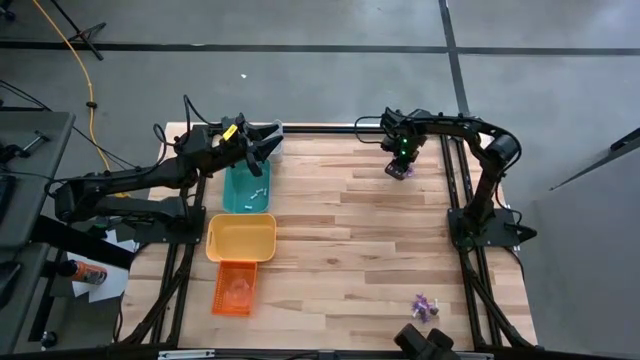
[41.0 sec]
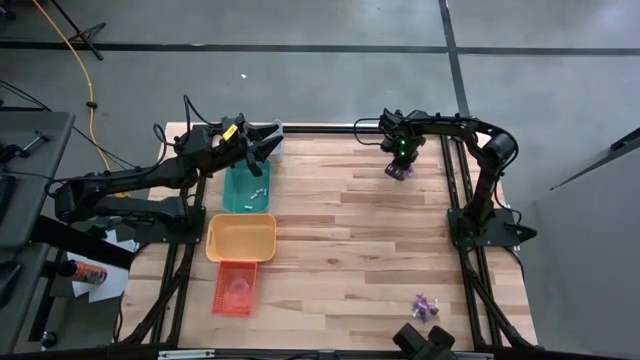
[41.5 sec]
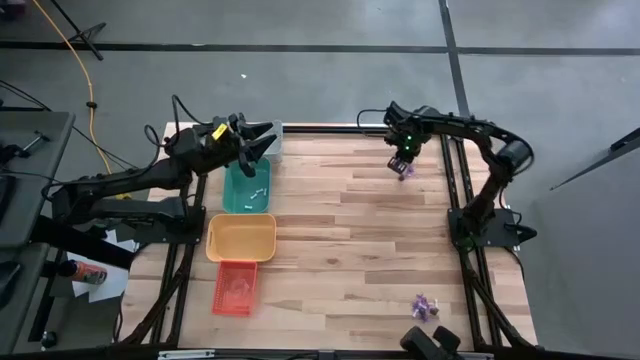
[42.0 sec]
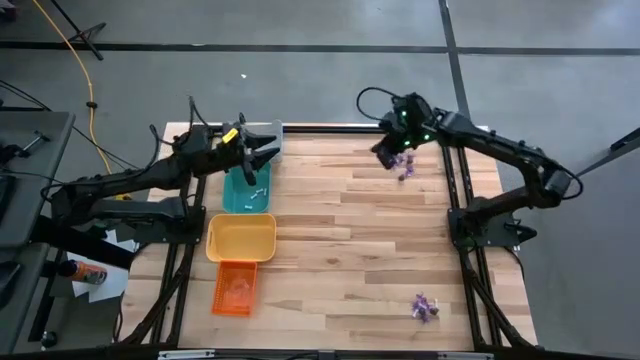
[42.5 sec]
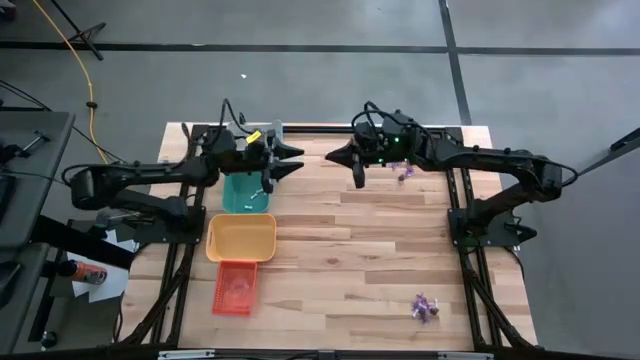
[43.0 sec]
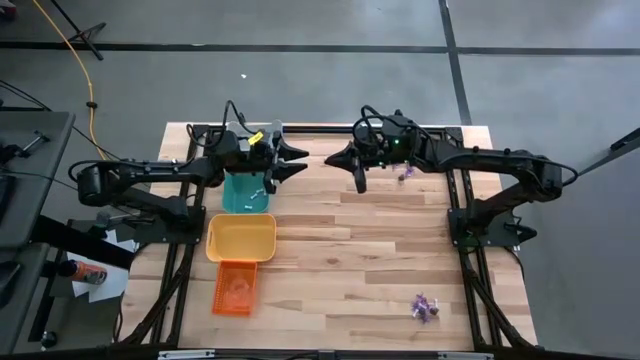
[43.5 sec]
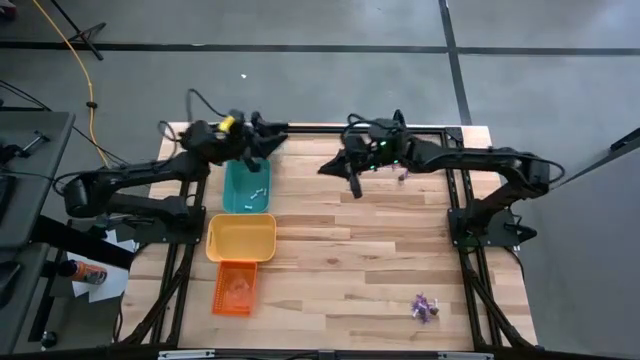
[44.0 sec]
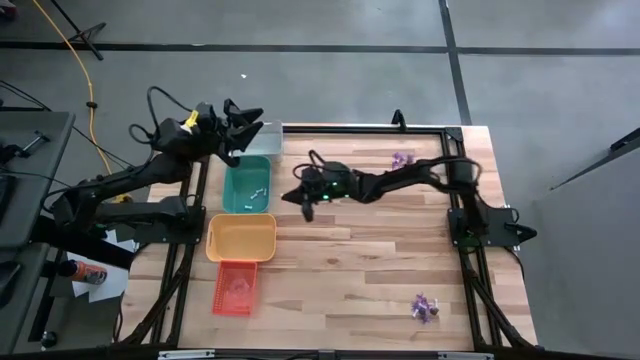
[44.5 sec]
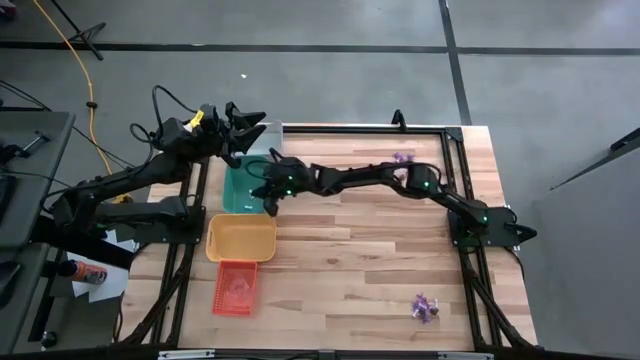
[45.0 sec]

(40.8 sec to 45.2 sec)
Task: Sort Halloween decoration
Put the white bone toy in the green bin

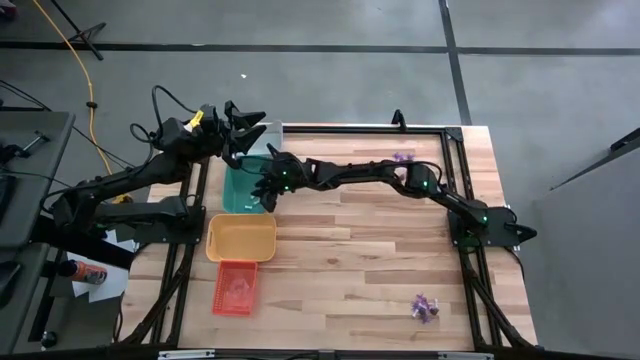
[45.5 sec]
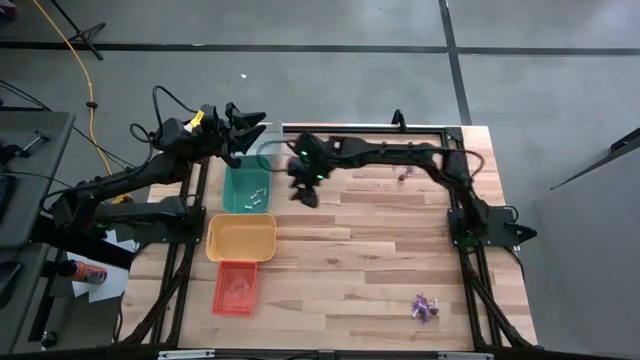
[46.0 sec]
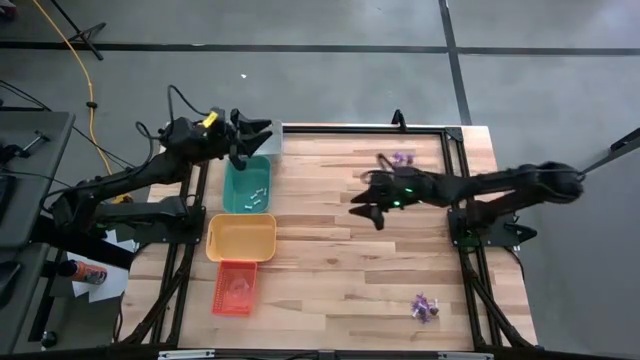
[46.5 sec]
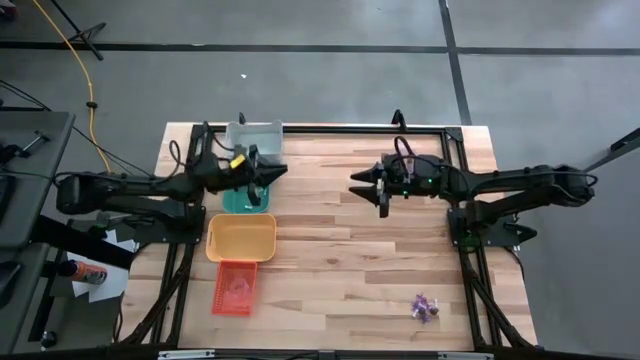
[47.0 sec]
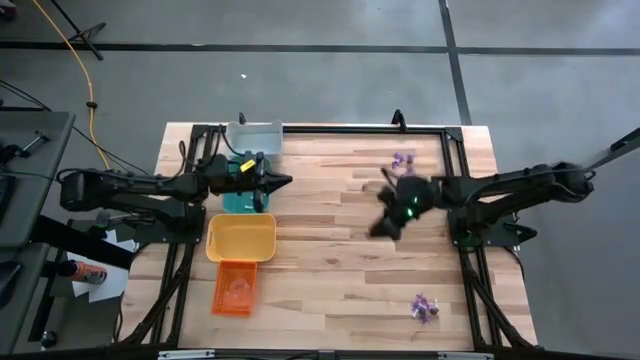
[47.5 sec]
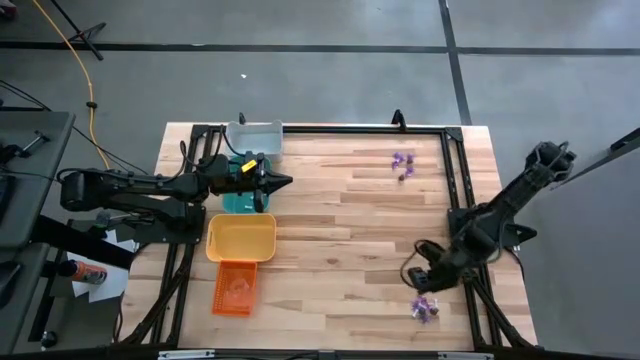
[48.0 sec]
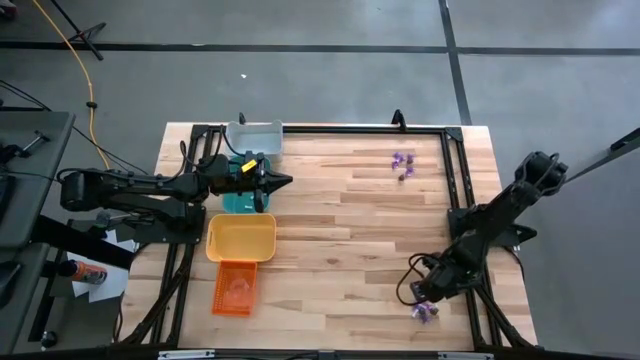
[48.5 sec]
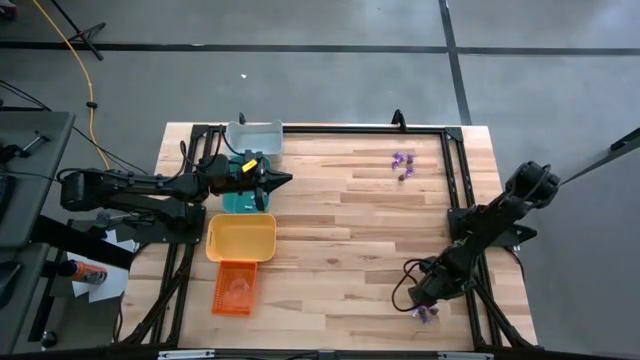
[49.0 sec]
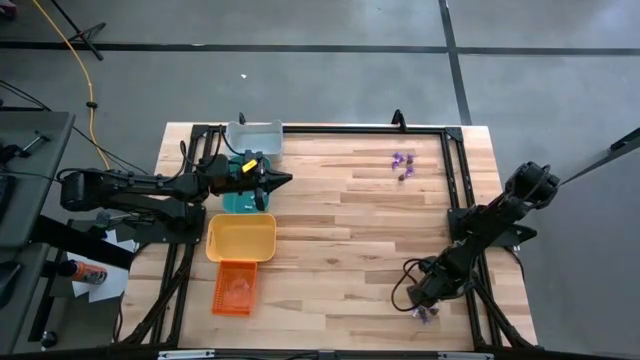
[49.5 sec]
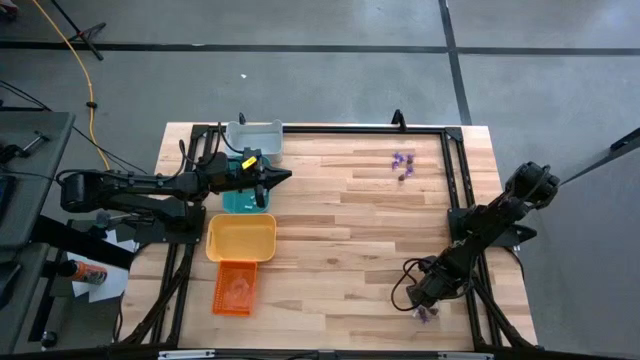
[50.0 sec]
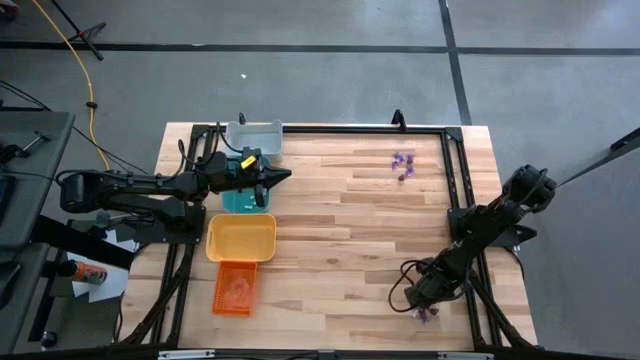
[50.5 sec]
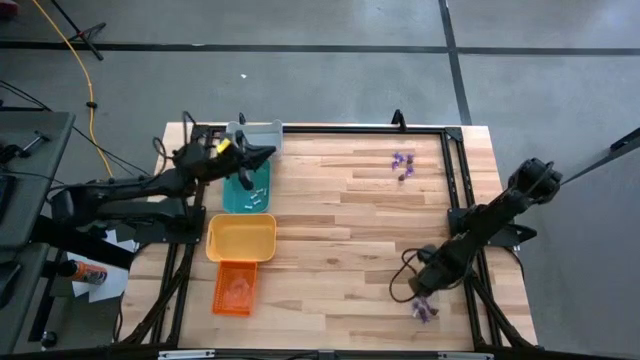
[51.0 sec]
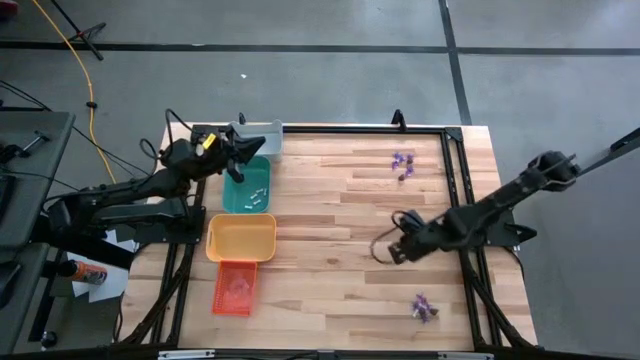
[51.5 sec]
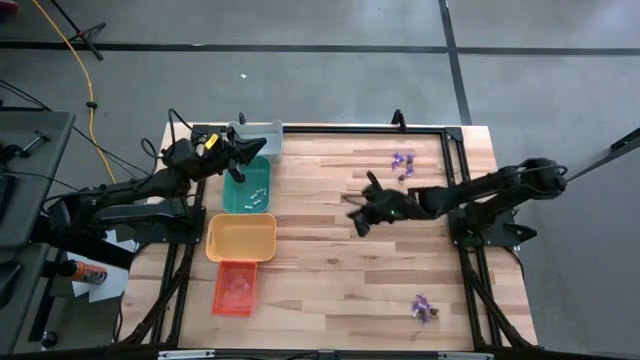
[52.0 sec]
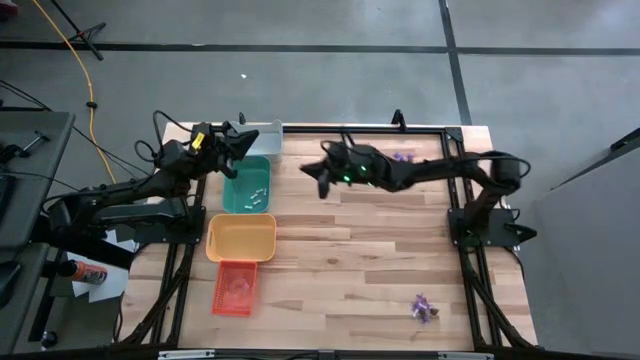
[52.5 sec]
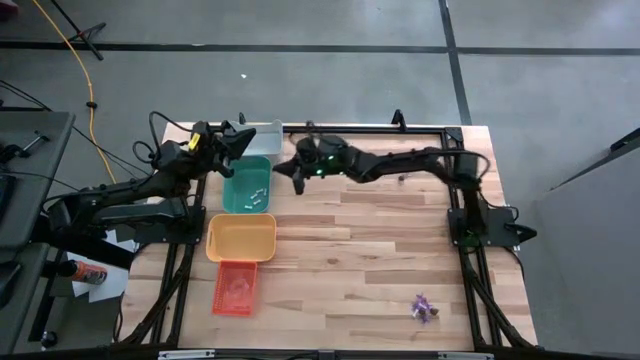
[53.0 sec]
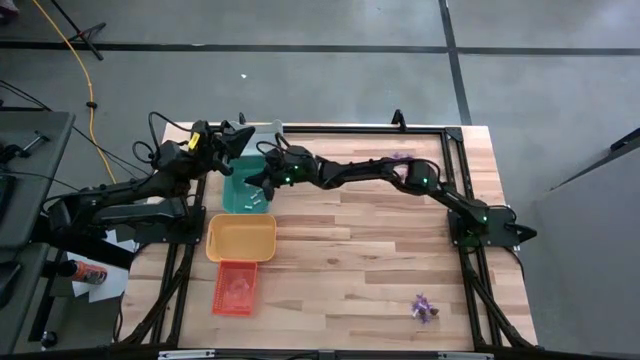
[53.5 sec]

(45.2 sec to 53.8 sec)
Put the white bone toy in the green bin

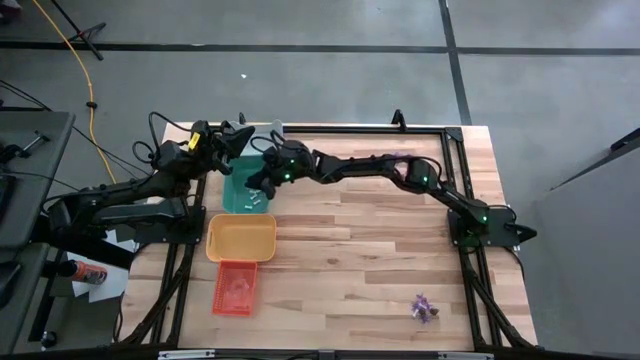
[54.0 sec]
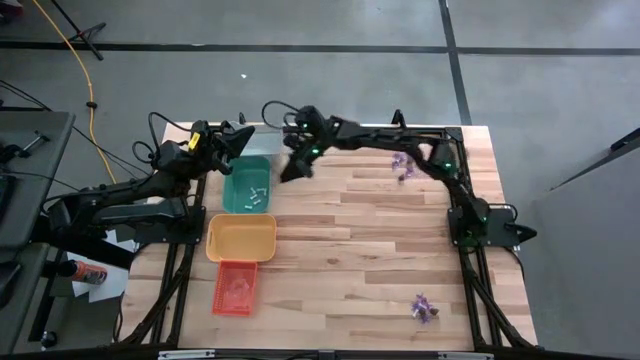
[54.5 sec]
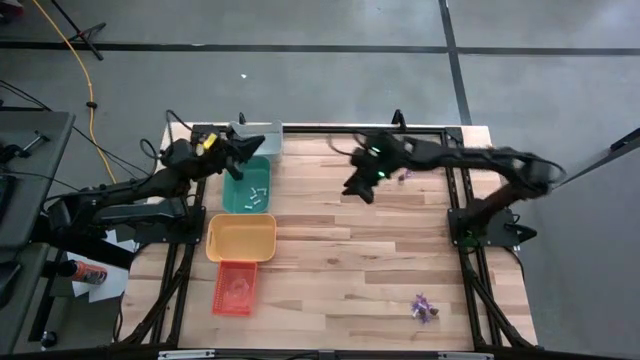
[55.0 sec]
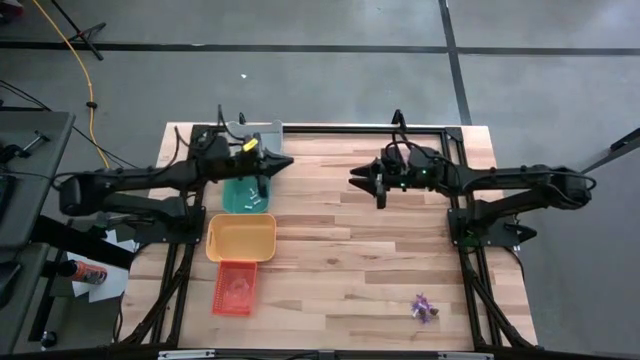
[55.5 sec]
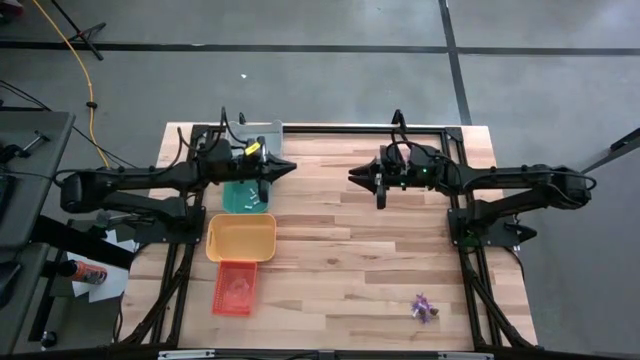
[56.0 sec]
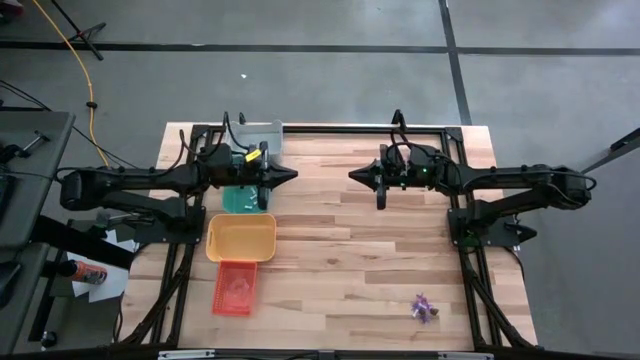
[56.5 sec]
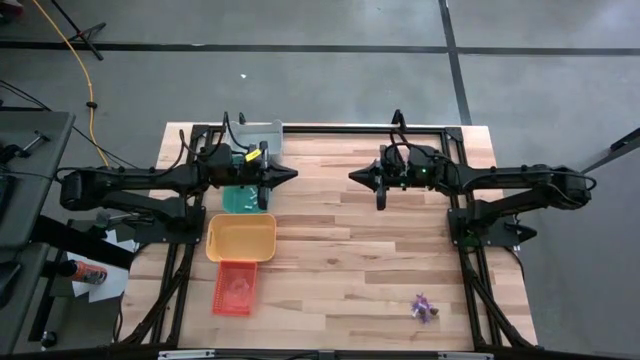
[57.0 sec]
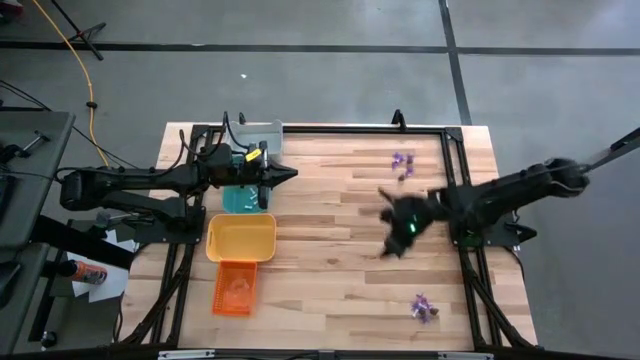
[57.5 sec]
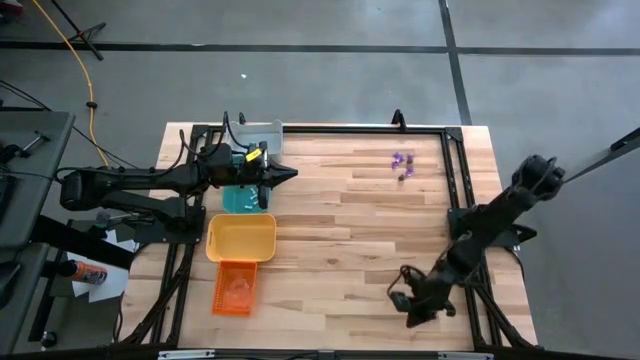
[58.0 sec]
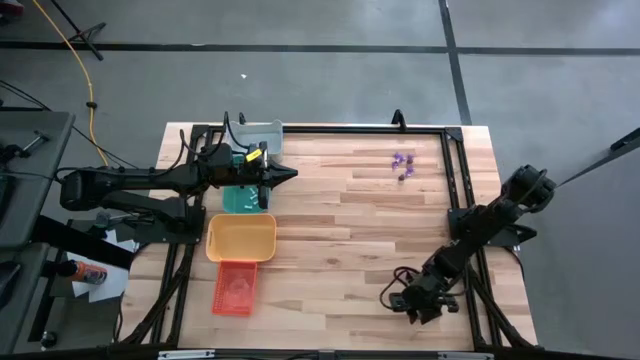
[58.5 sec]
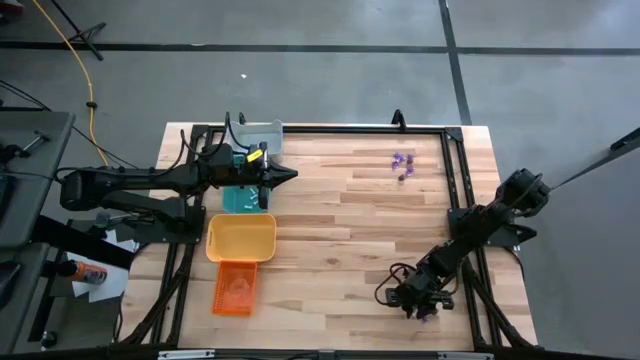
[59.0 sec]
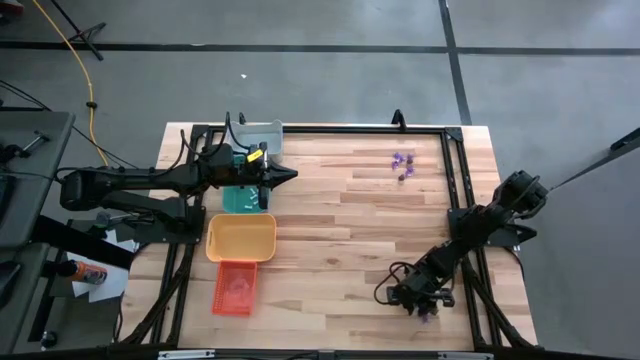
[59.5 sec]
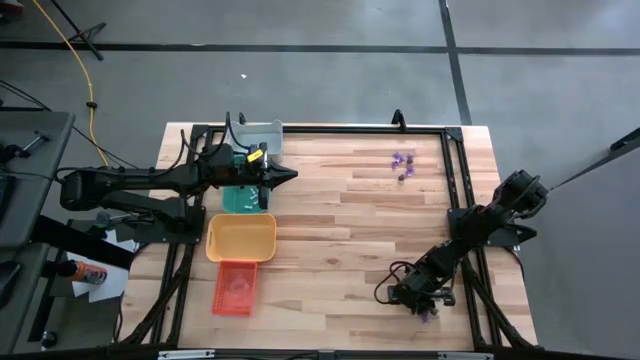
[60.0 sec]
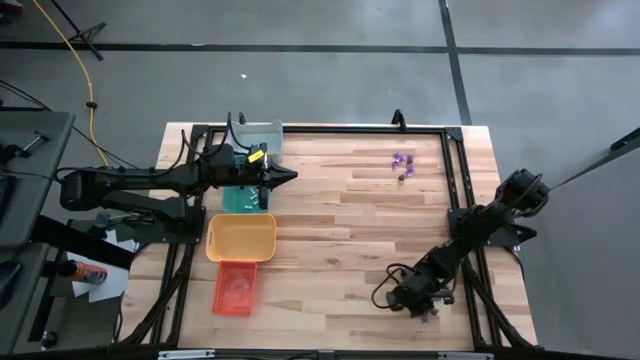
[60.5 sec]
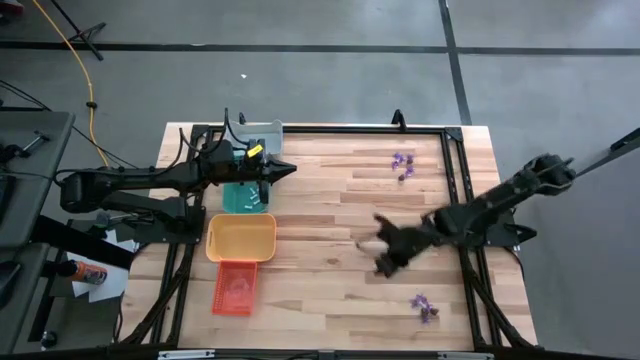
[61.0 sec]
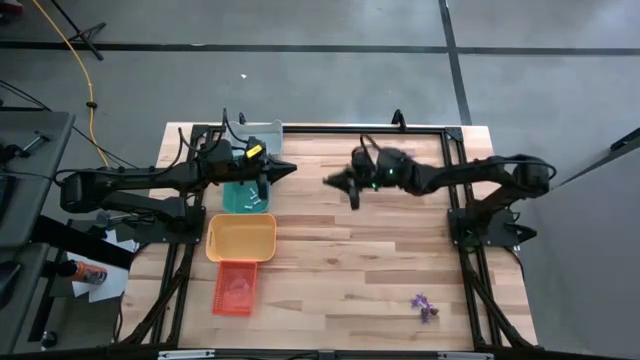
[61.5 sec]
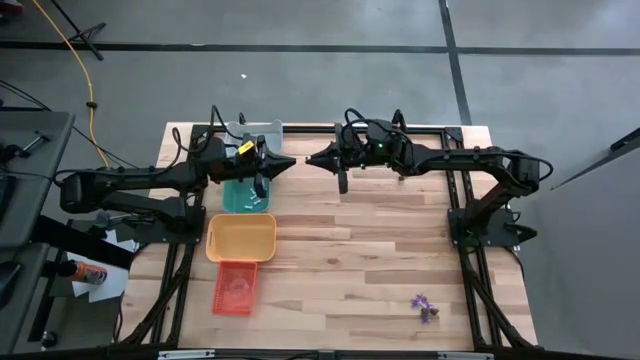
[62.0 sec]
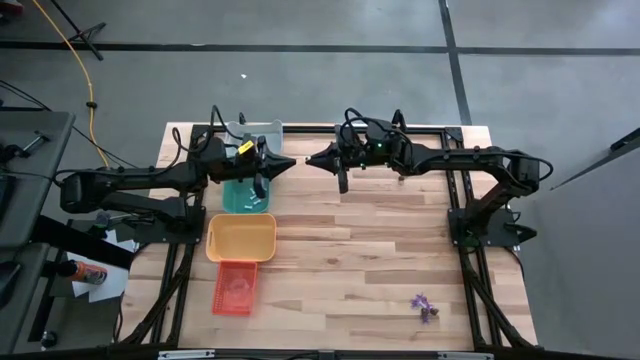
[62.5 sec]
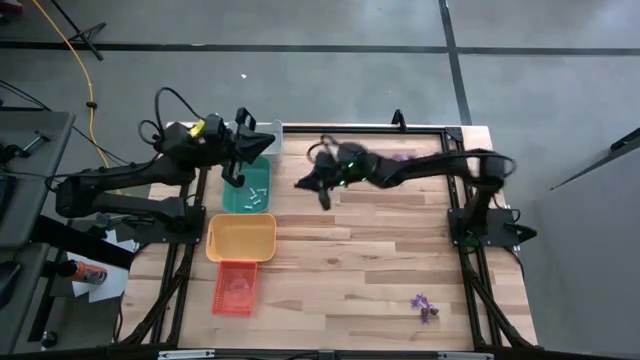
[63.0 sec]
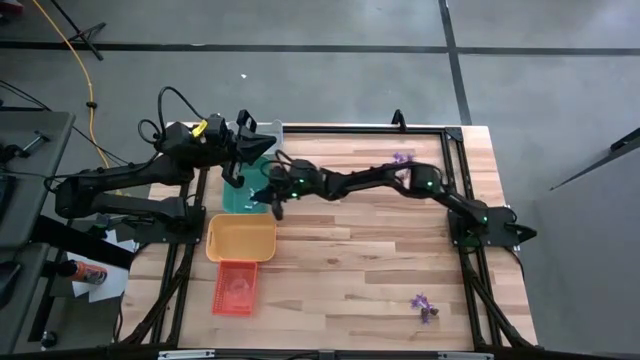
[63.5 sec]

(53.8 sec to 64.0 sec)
Put the white bone toy in the green bin
